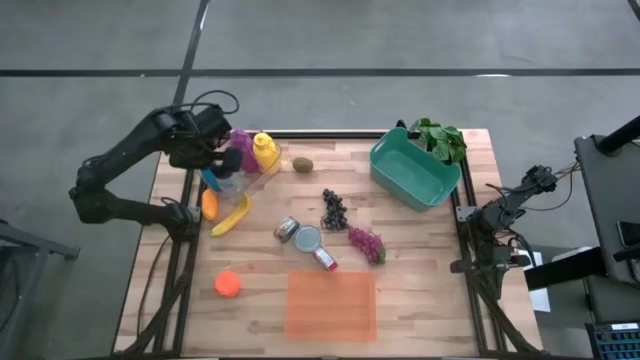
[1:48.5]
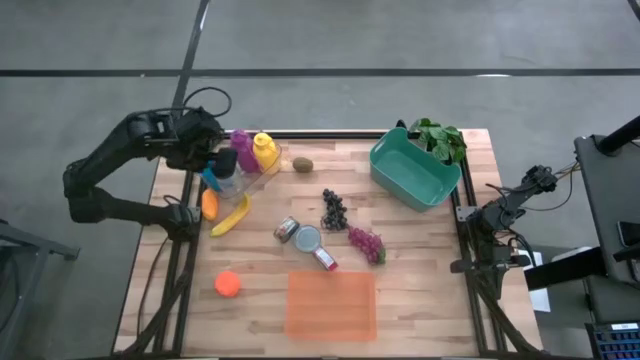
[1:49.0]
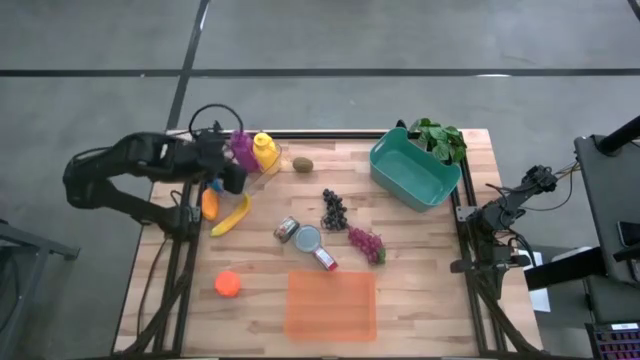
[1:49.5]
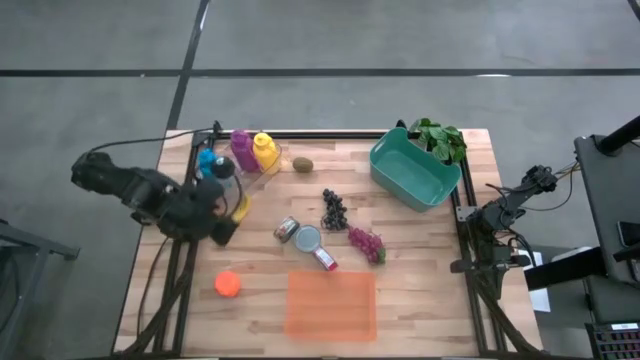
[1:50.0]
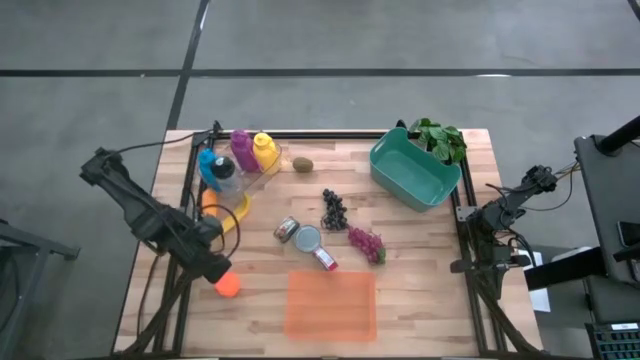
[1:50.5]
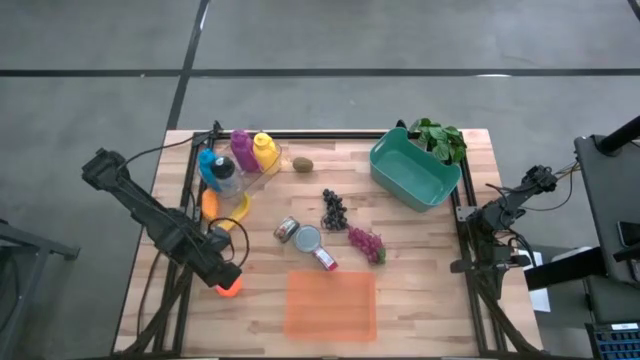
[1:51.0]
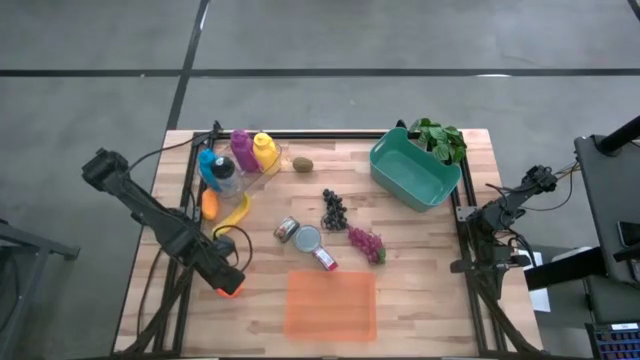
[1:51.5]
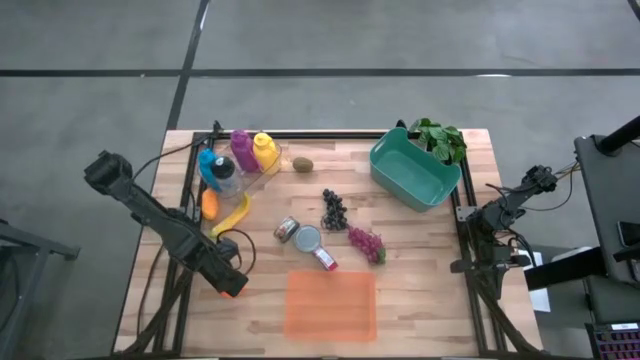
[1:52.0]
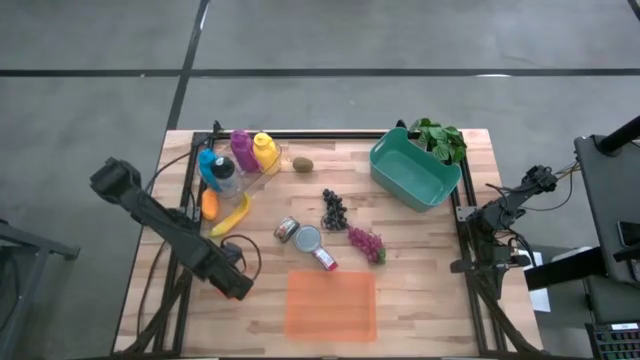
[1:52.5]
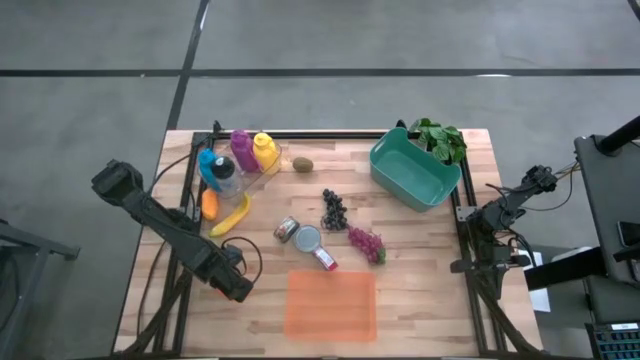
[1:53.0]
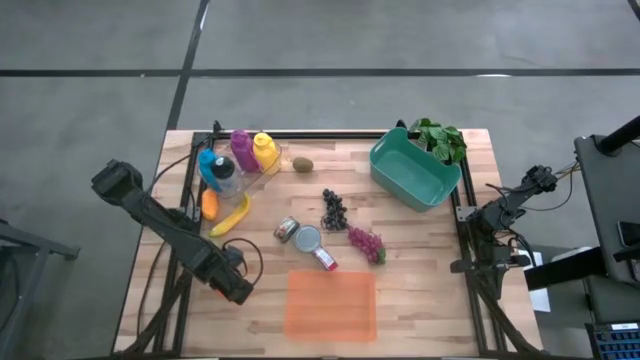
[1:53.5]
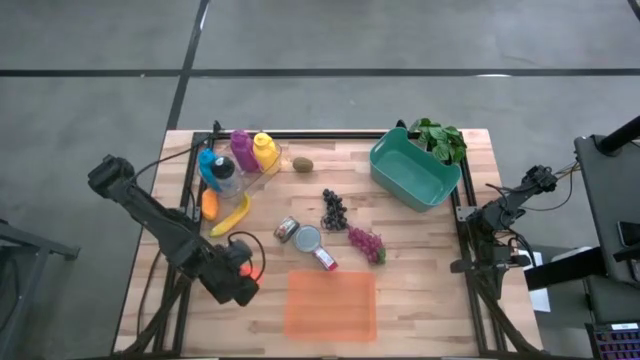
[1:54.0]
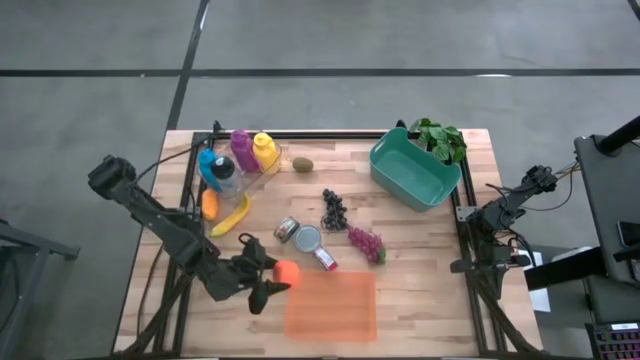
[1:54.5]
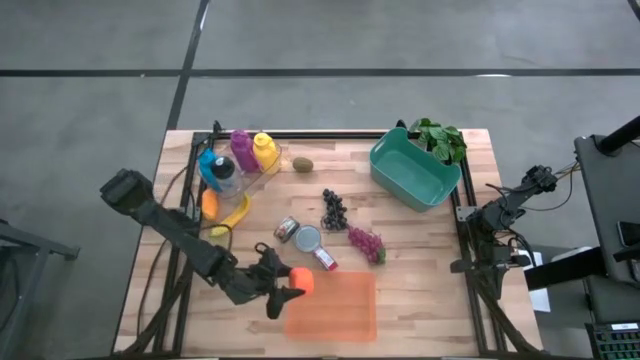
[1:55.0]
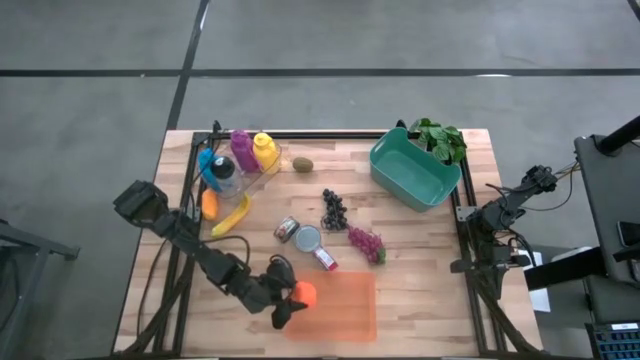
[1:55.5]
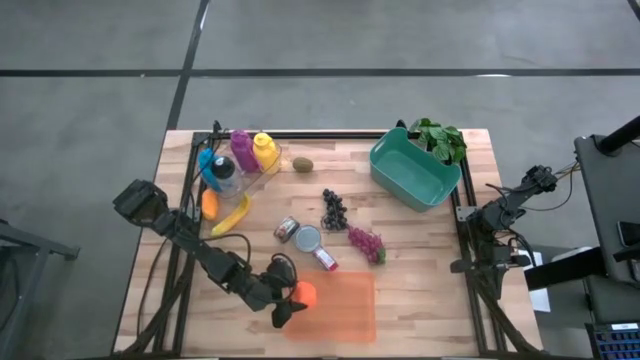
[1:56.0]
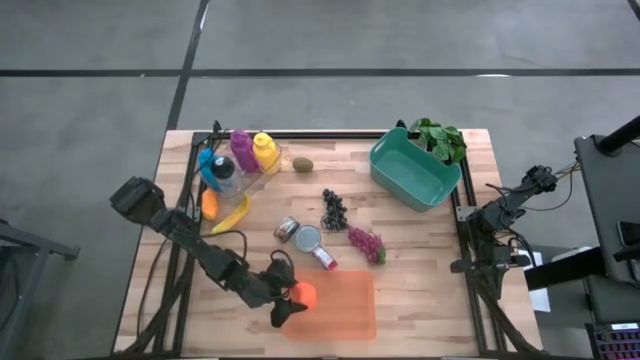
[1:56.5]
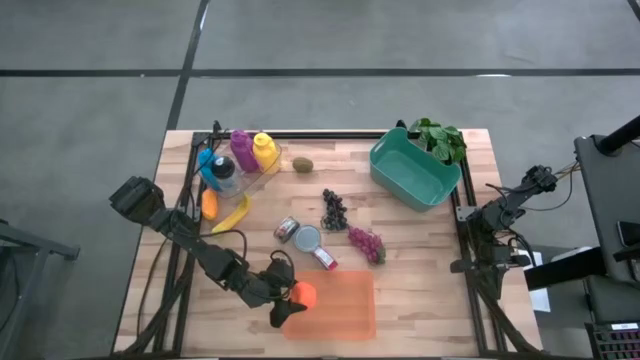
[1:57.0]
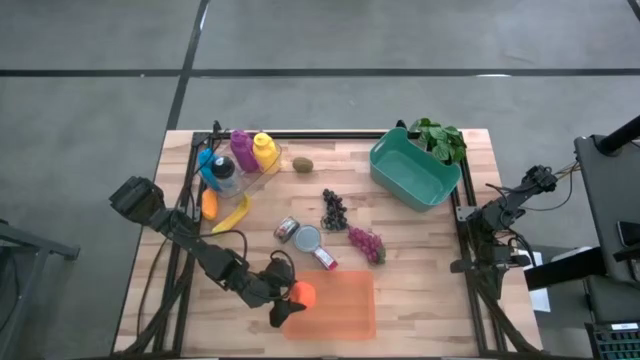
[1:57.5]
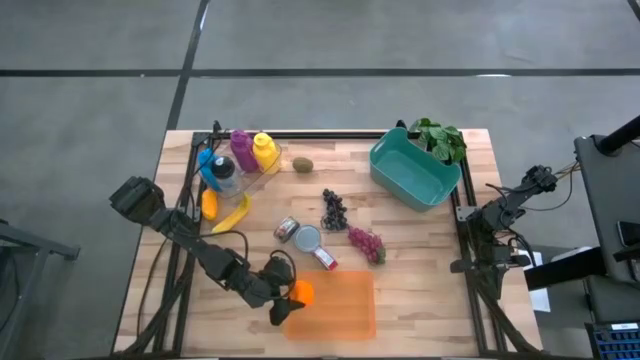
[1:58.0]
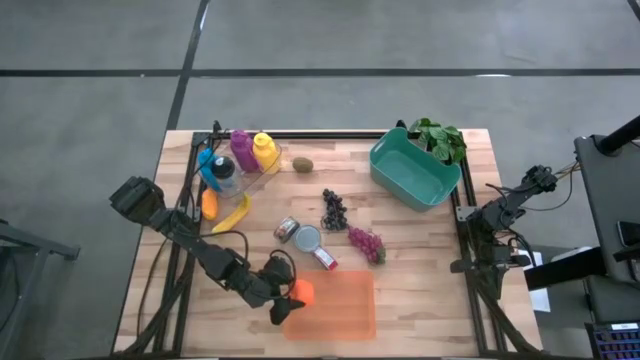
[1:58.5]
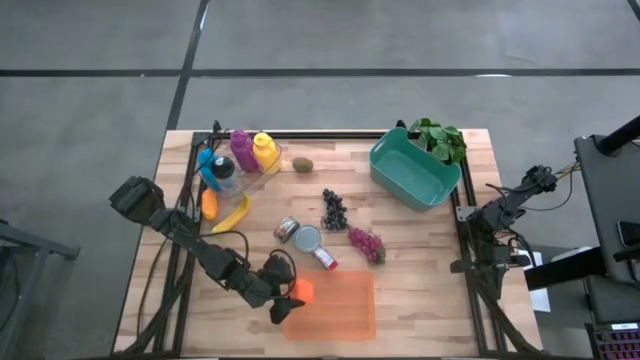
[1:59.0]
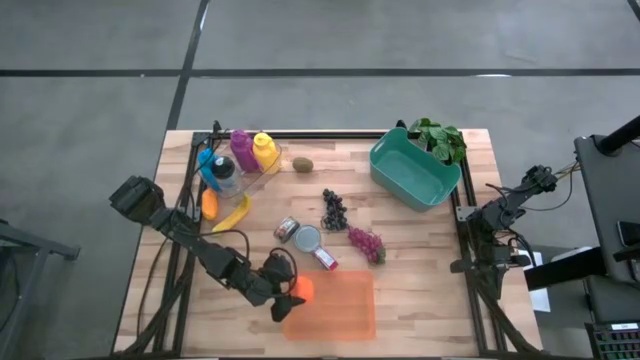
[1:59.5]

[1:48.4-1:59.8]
Task: Pick & Place Food Item
Put the orange into the orange bin

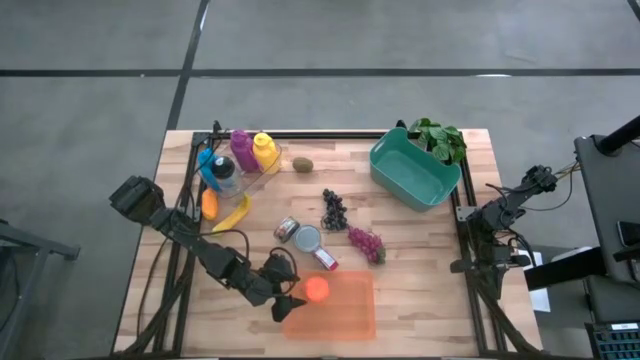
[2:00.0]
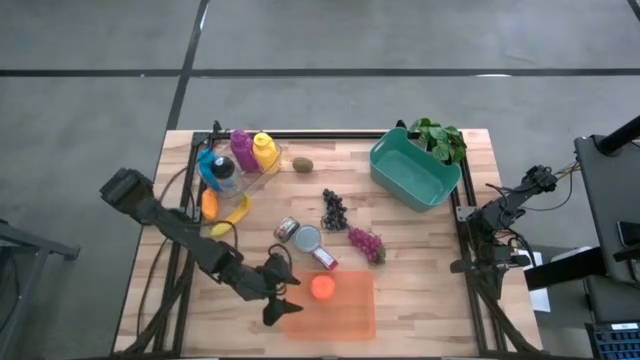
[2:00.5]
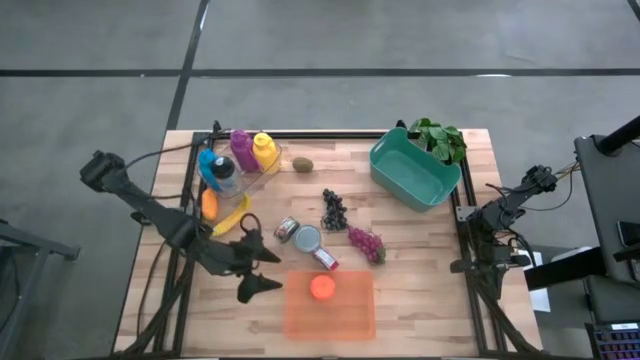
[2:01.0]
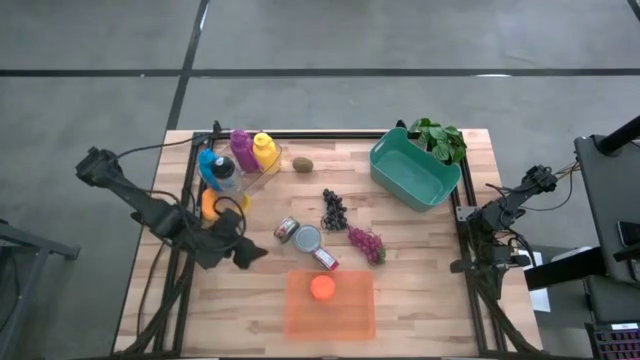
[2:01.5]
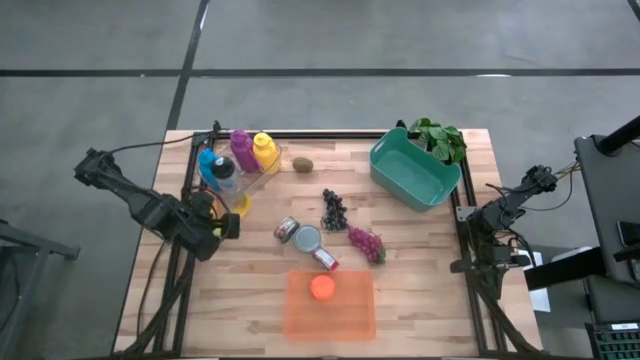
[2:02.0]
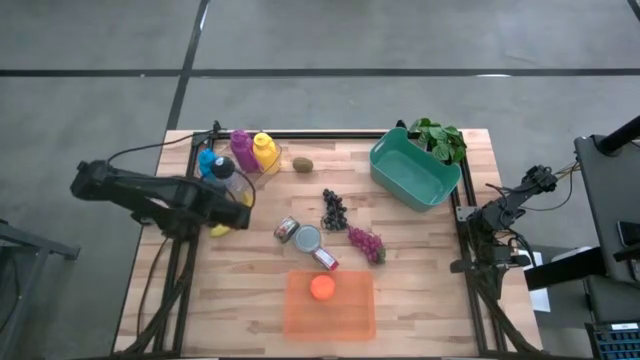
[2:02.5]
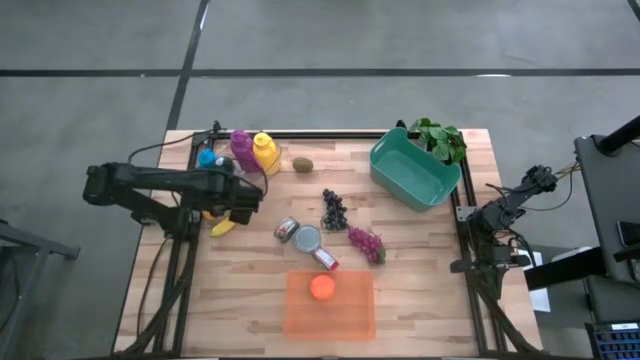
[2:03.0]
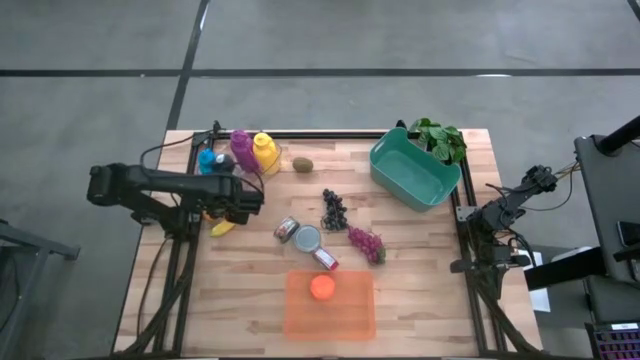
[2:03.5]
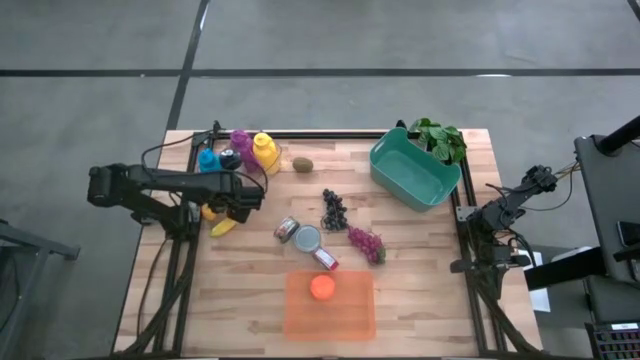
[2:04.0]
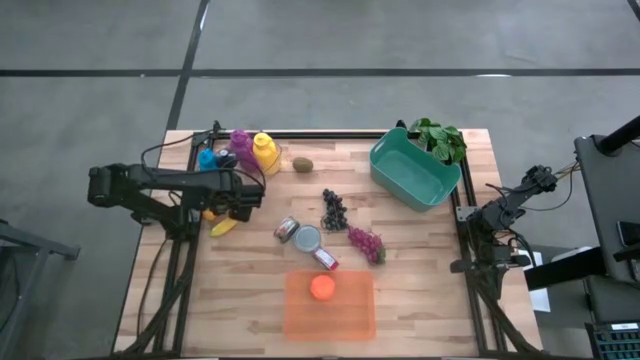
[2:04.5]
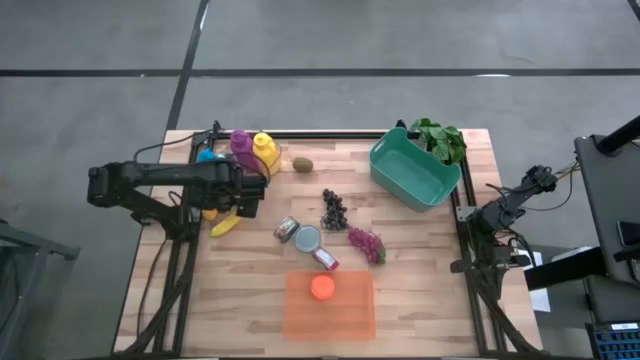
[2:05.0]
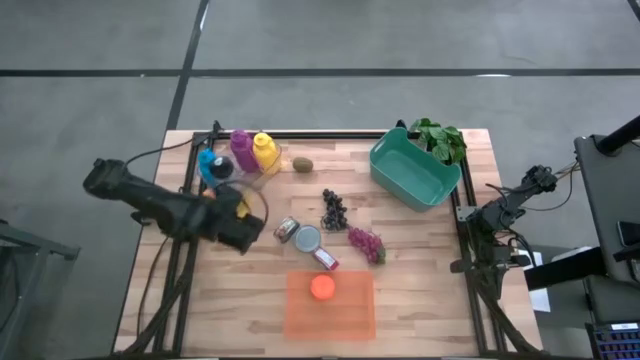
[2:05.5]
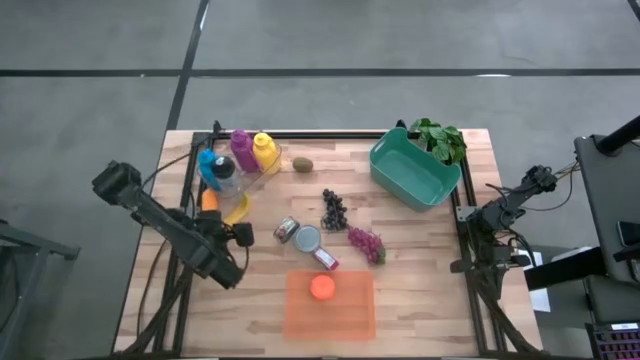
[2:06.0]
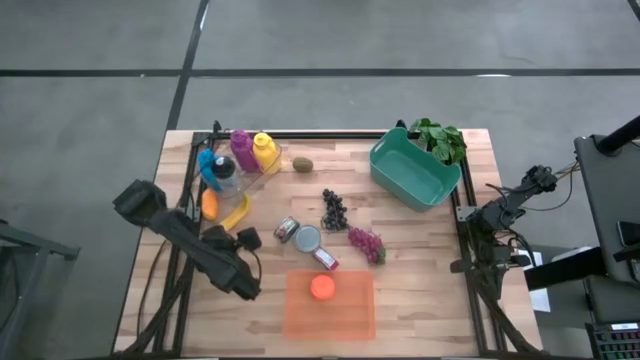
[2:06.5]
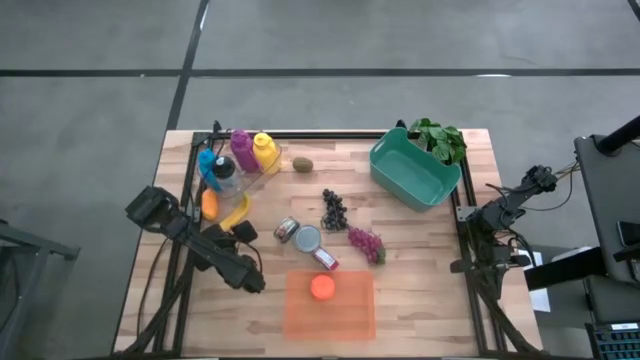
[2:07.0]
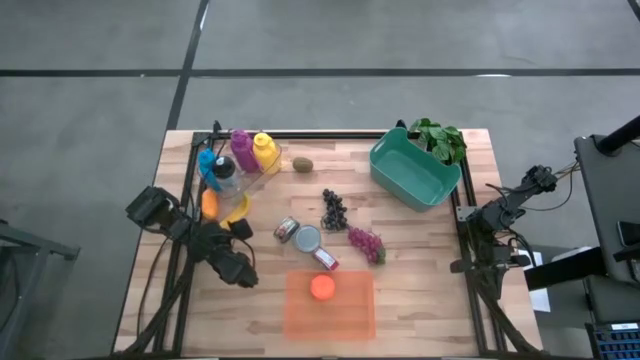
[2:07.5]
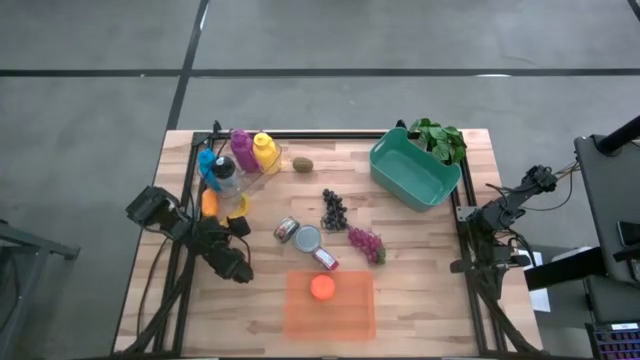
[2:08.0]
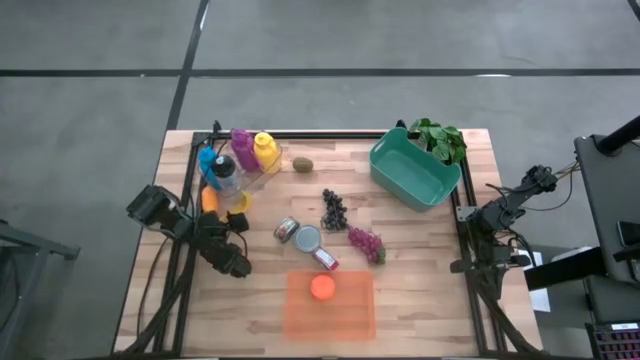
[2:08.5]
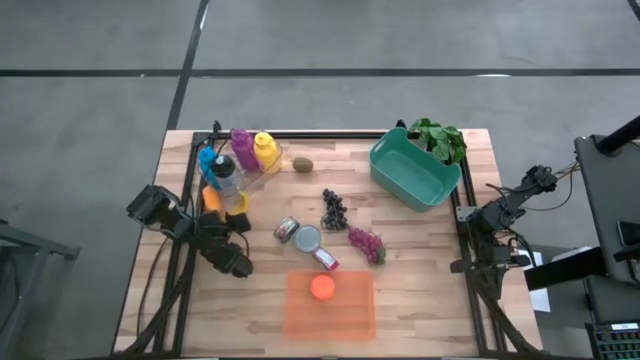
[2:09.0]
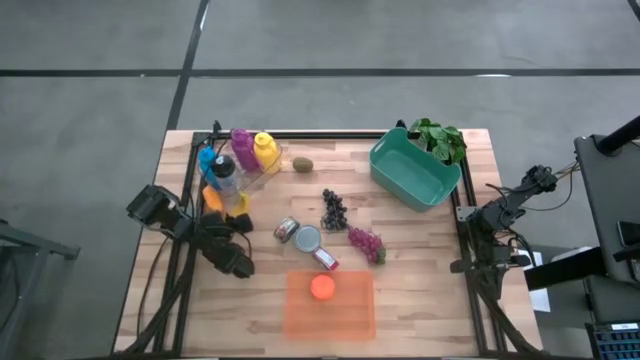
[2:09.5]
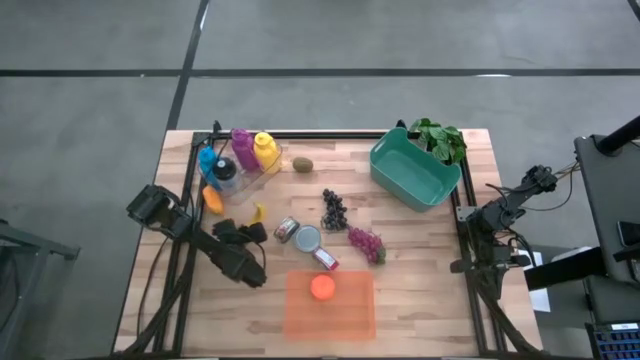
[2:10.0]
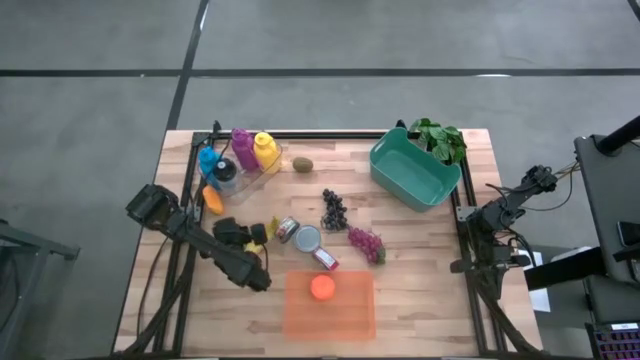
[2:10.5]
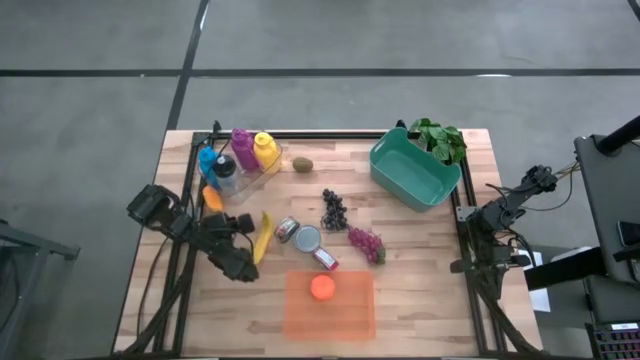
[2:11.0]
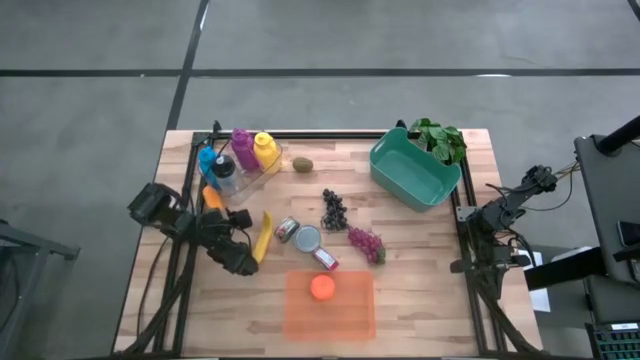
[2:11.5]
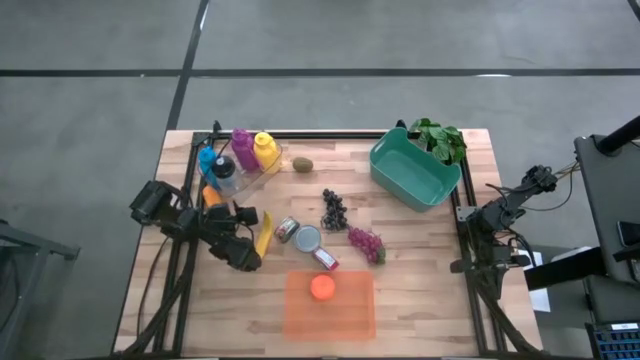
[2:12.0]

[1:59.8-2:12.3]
Put the yellow mango into the orange bin
